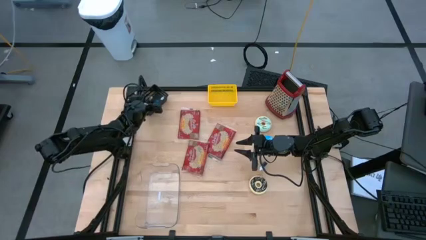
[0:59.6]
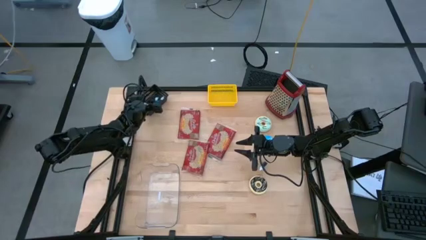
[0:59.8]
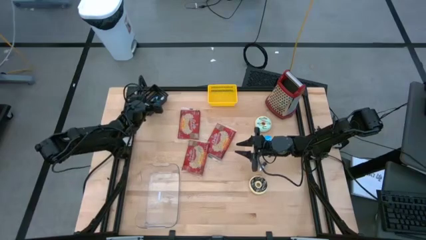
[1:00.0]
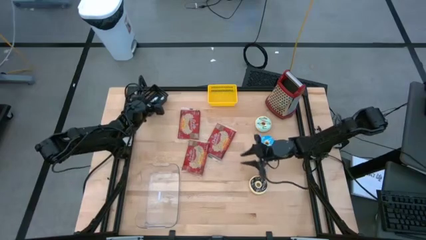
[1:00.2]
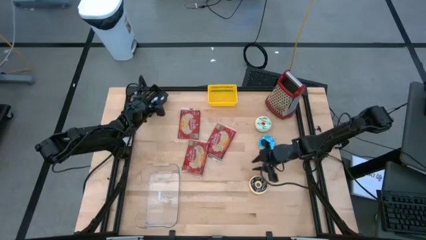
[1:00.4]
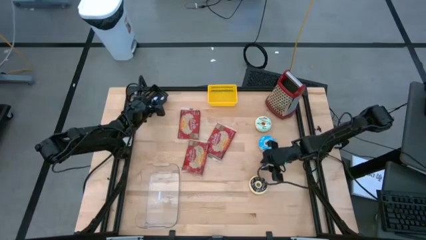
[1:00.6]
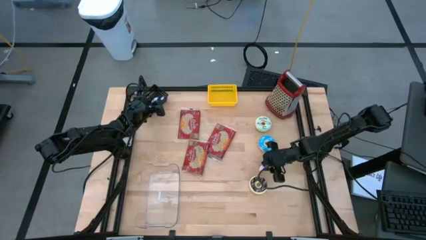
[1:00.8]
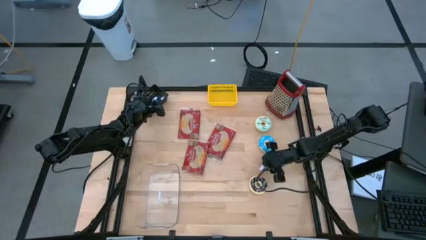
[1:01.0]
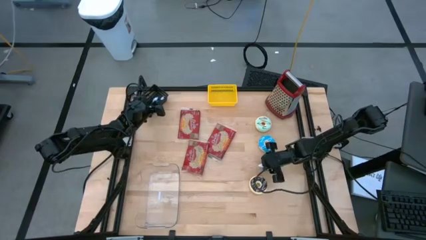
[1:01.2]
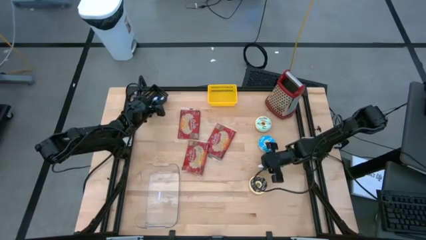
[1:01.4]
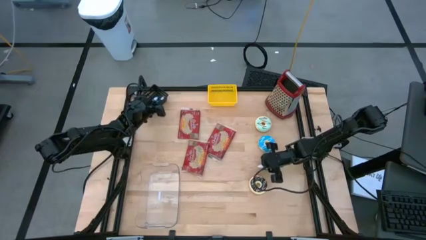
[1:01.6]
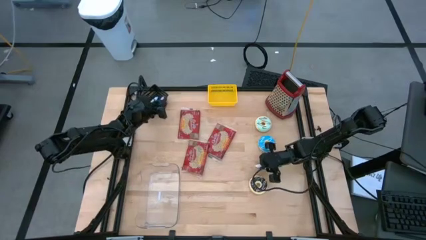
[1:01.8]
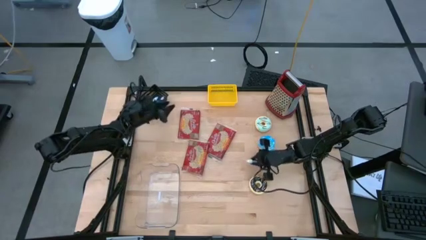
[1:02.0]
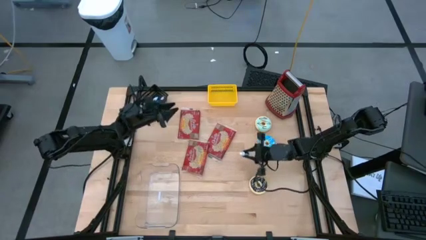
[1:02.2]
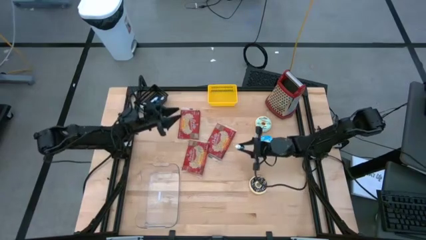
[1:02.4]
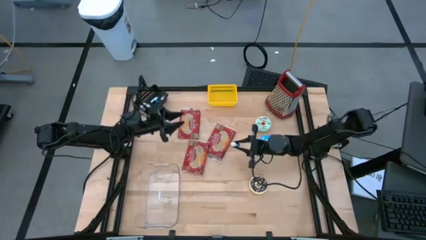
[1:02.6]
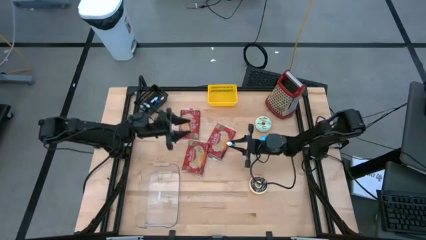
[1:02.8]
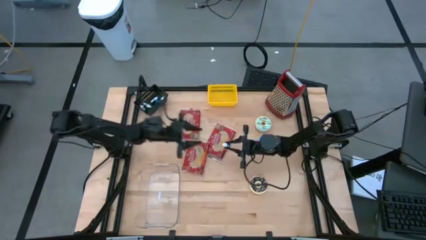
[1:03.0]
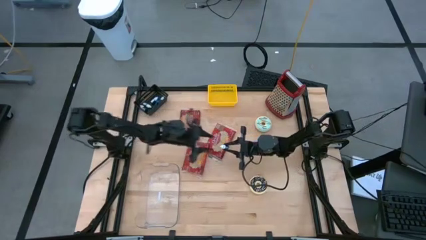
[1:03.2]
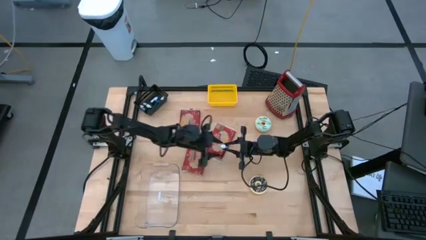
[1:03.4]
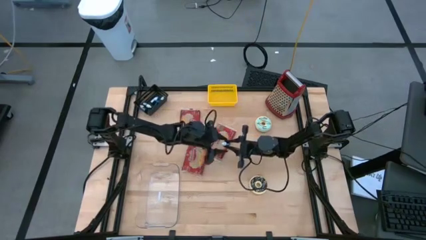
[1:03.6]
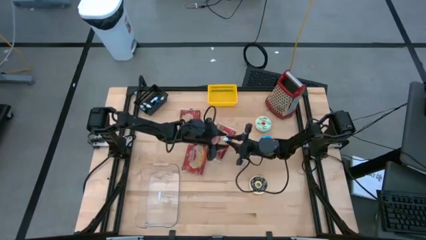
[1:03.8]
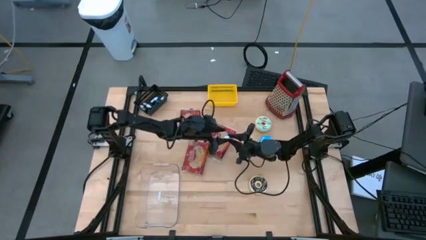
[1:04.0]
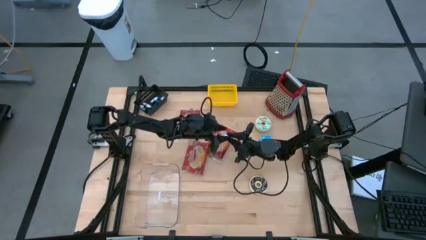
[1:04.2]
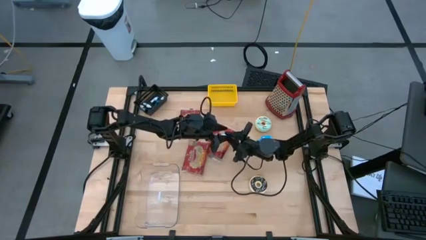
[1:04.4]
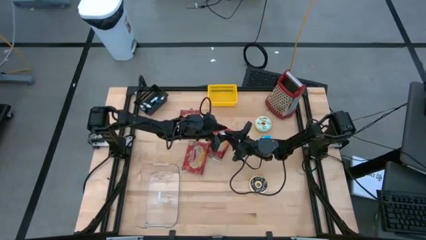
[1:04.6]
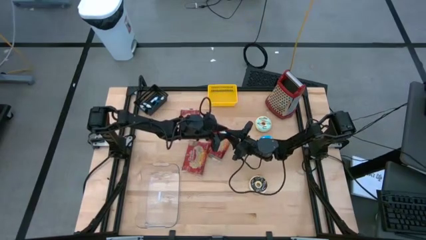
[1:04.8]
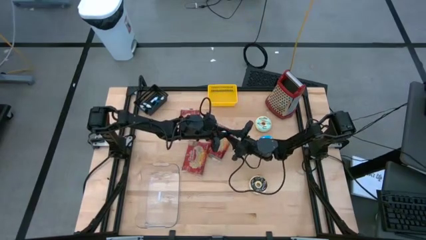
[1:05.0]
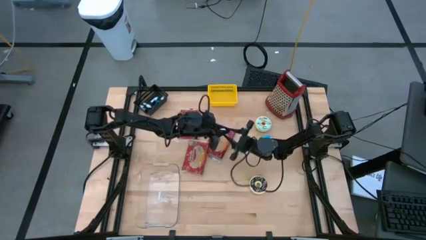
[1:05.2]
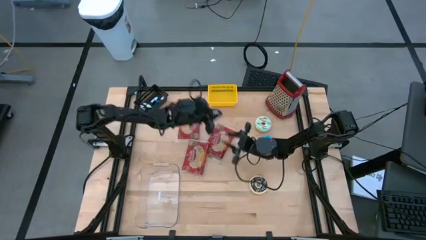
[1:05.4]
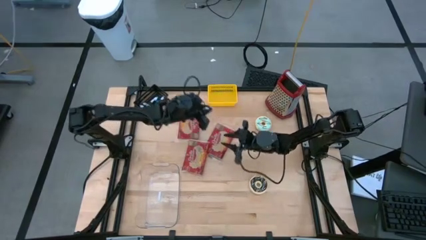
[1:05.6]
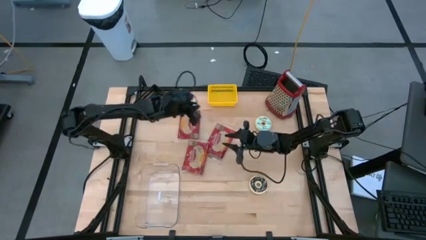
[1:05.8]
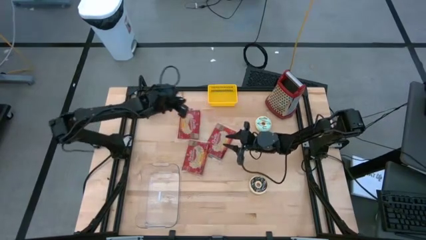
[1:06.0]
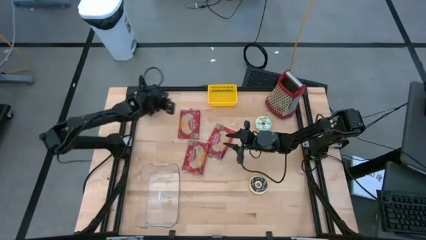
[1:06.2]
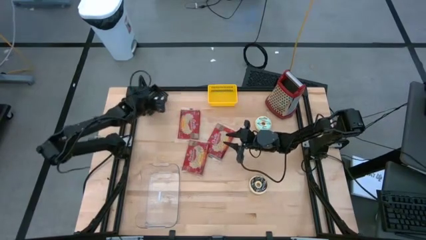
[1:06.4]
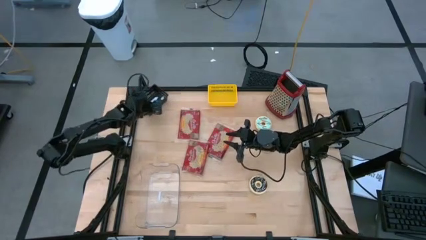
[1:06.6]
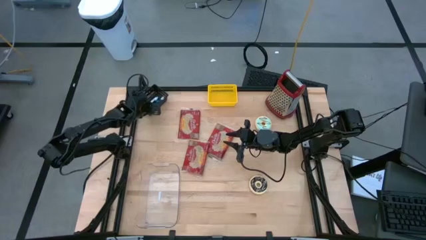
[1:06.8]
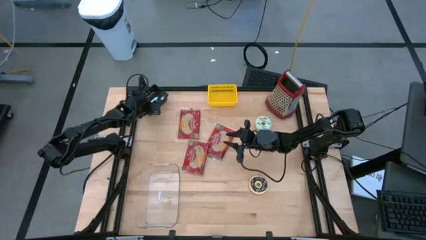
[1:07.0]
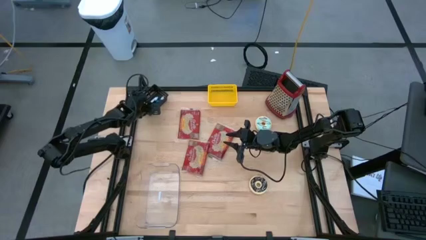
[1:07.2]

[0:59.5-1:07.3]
Put the purple food coloring bottle into the black bin

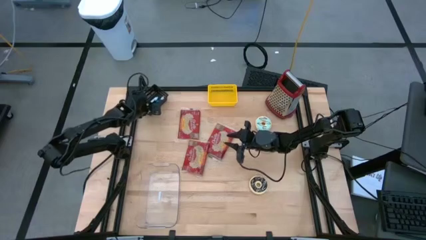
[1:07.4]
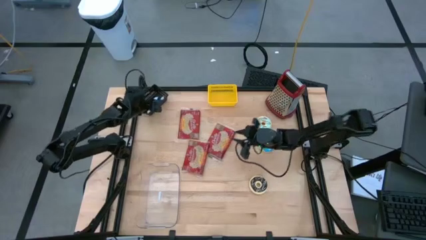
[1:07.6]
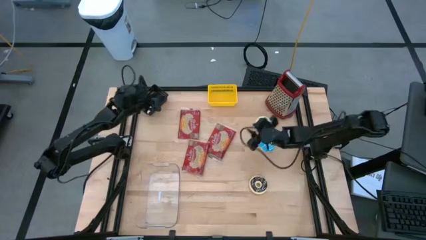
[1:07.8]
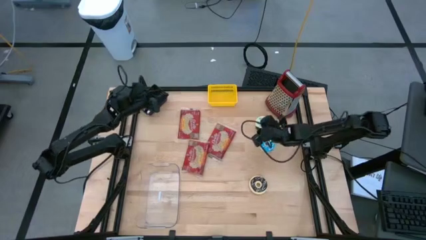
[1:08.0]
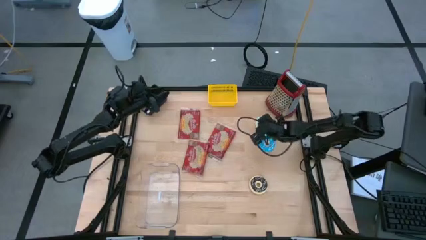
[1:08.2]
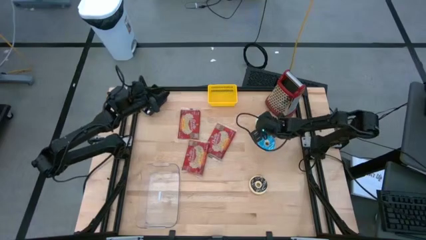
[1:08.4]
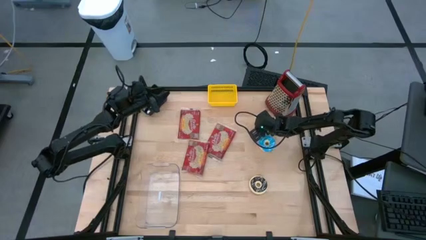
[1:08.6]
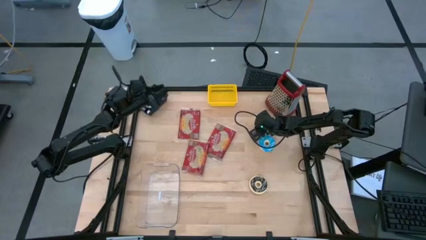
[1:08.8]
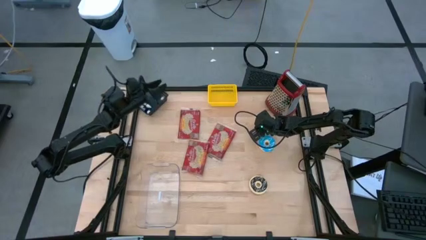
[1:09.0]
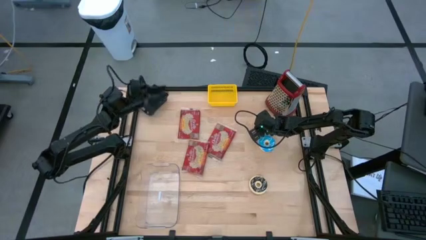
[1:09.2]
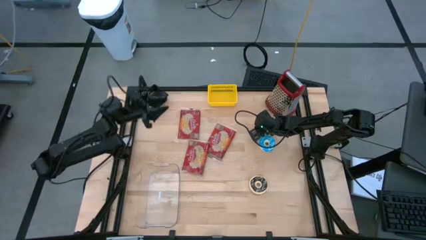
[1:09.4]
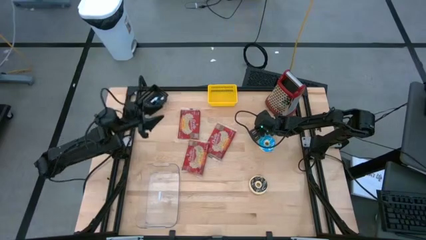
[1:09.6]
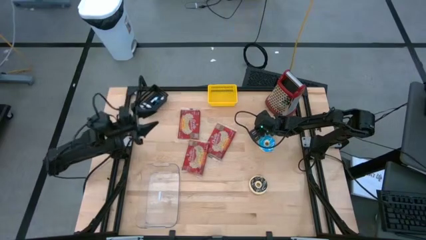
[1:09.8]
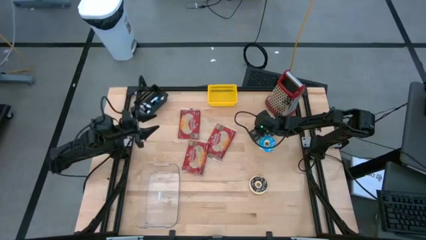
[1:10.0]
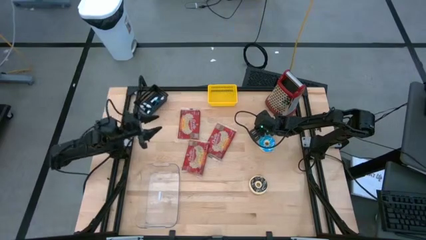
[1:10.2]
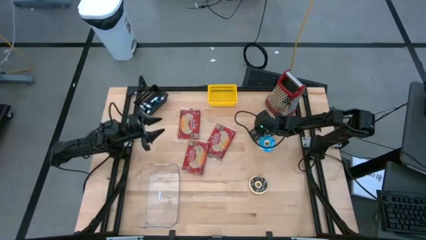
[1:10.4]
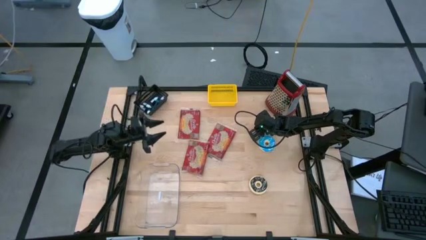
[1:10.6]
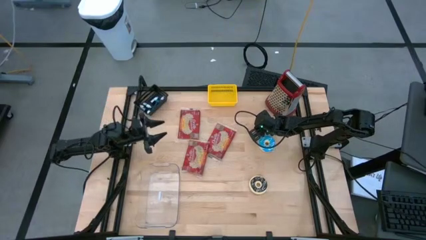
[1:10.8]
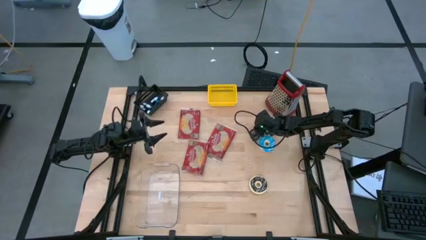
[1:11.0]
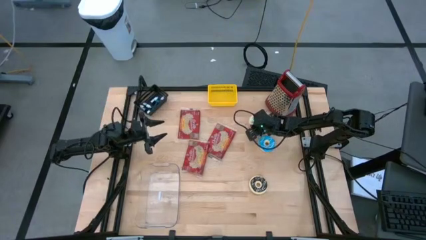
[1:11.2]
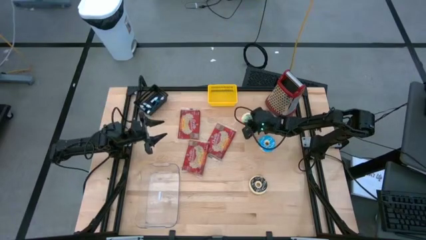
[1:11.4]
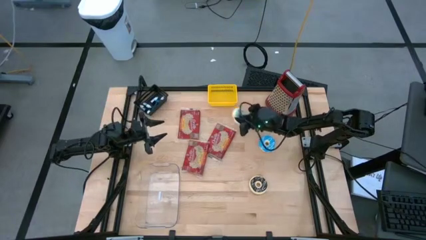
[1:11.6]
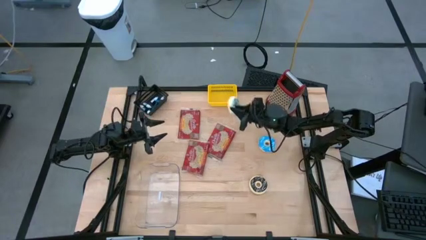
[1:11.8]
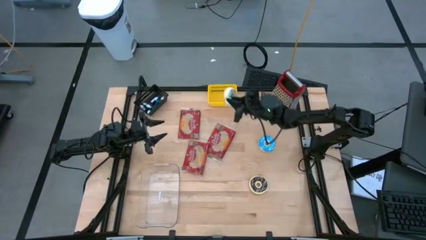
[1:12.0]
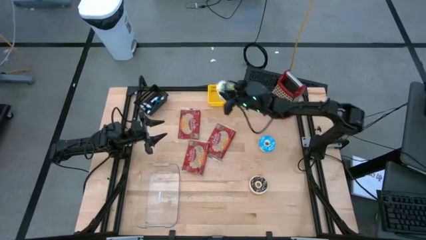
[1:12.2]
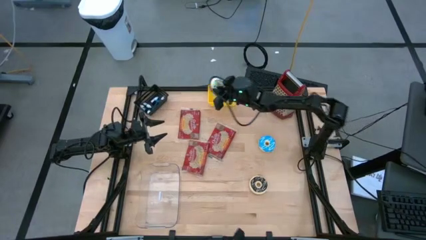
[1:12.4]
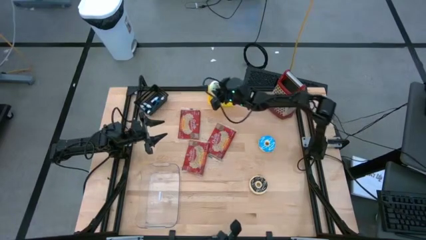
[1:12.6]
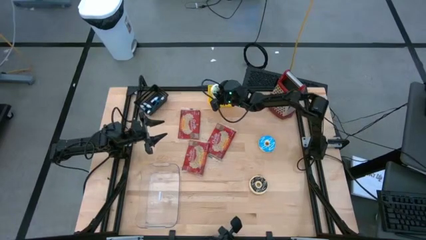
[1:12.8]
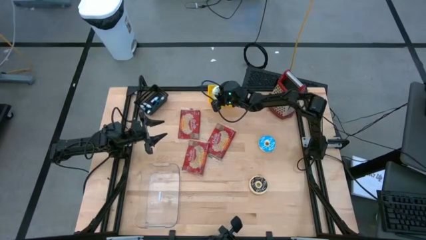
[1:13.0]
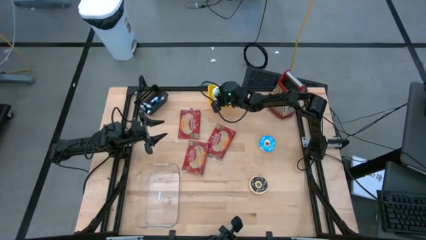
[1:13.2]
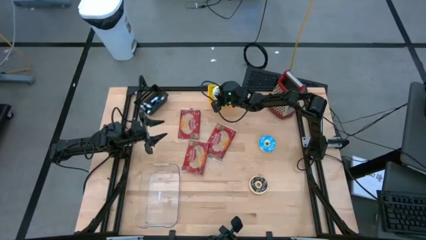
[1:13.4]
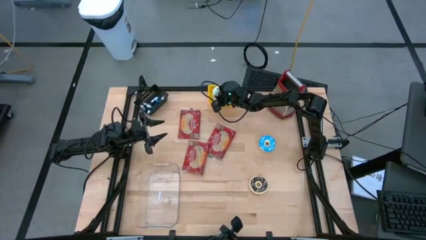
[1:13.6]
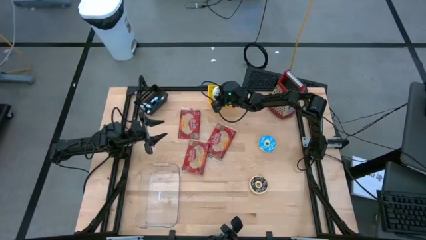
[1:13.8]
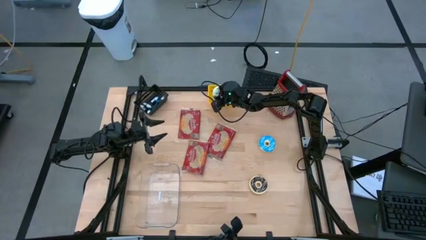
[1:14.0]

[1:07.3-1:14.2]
Put the light blue donut into the yellow bin
